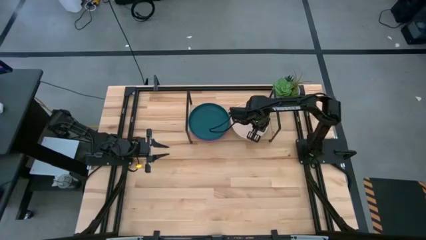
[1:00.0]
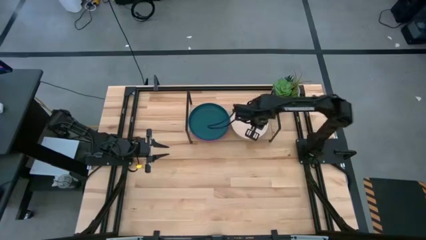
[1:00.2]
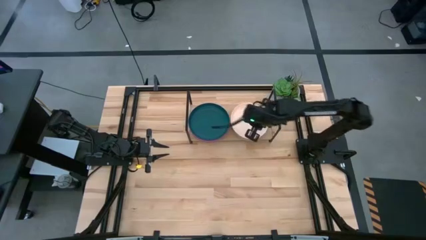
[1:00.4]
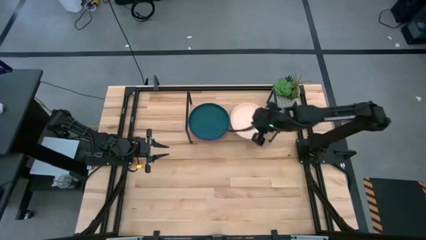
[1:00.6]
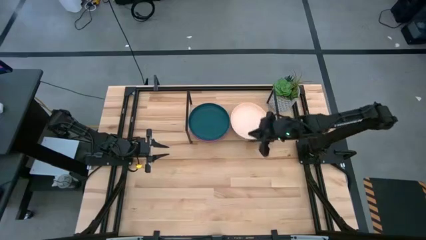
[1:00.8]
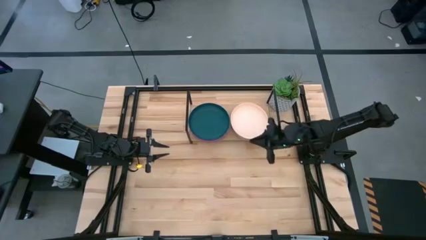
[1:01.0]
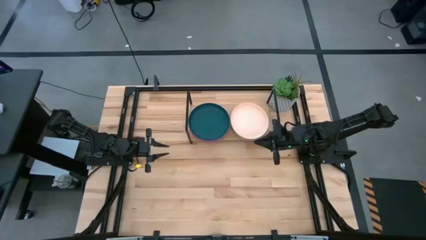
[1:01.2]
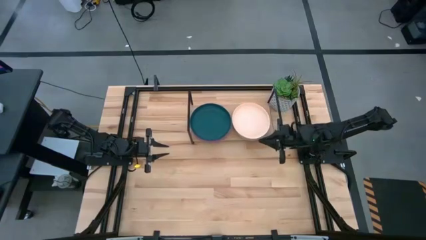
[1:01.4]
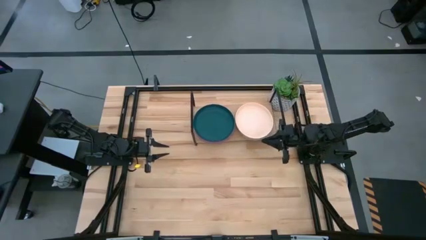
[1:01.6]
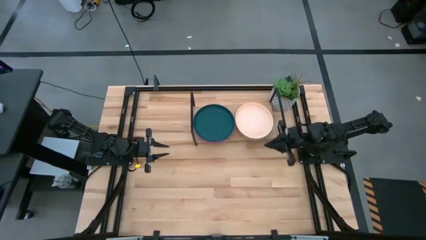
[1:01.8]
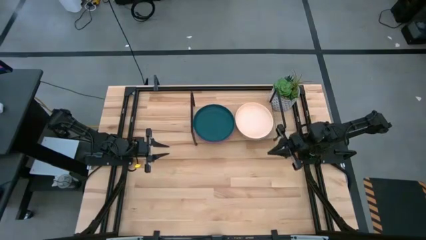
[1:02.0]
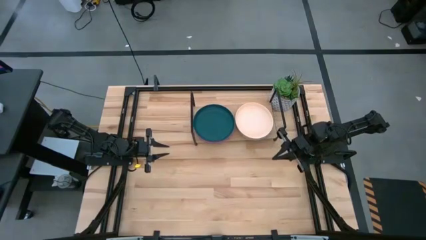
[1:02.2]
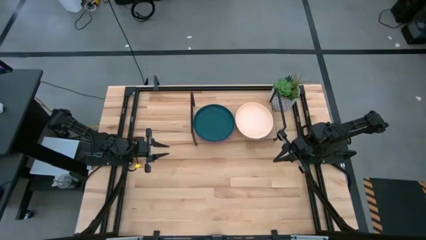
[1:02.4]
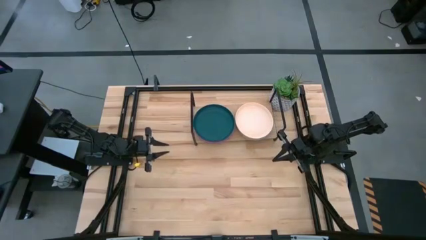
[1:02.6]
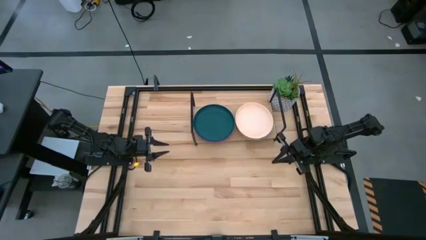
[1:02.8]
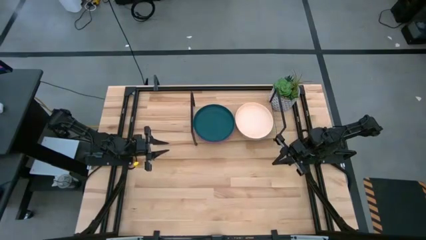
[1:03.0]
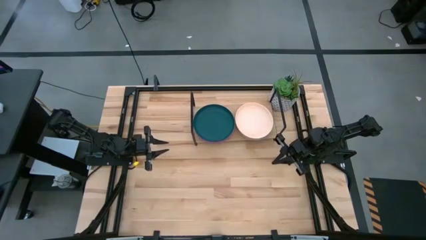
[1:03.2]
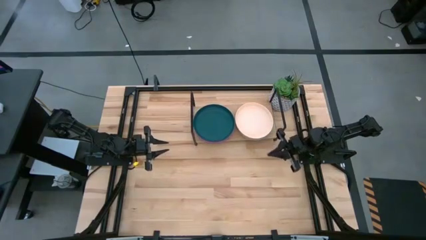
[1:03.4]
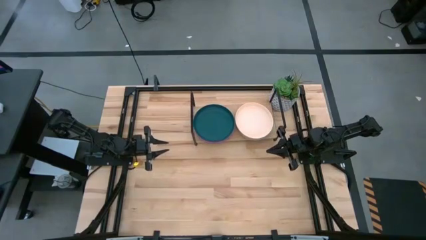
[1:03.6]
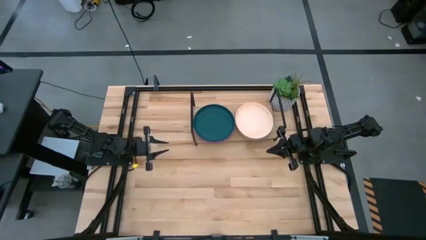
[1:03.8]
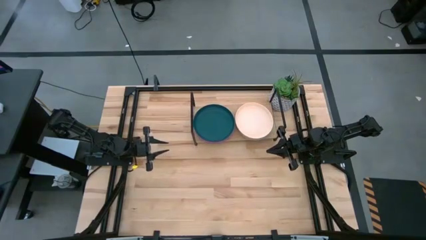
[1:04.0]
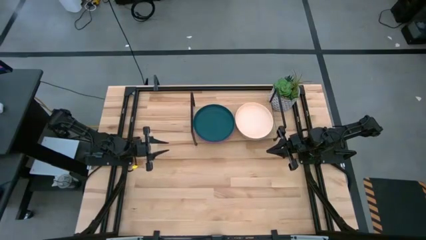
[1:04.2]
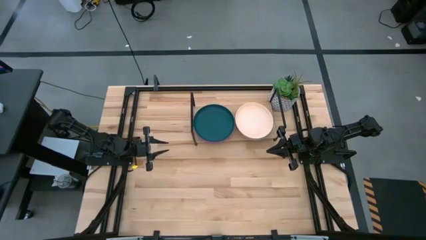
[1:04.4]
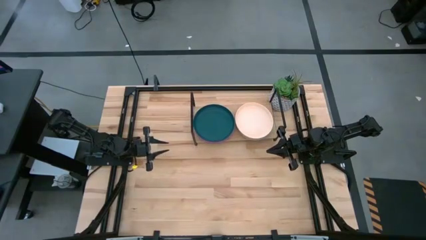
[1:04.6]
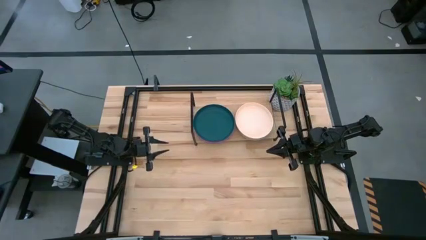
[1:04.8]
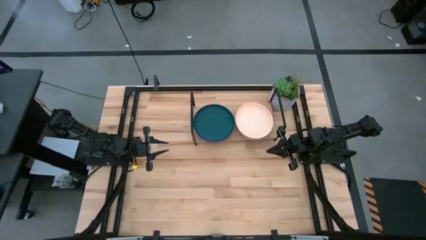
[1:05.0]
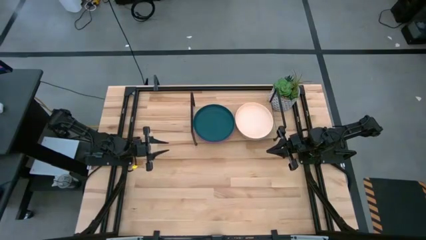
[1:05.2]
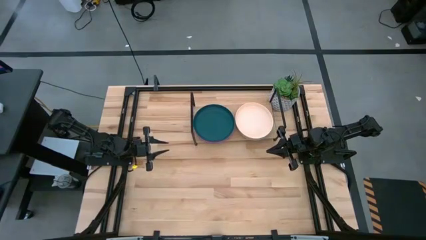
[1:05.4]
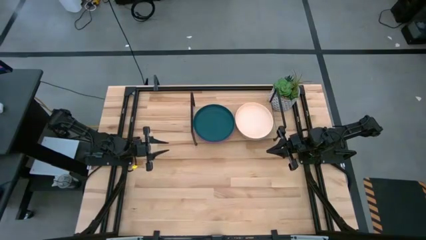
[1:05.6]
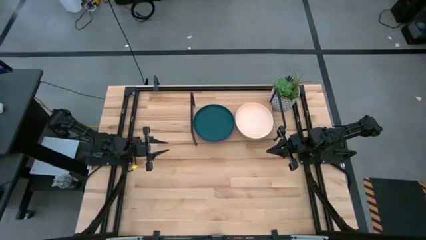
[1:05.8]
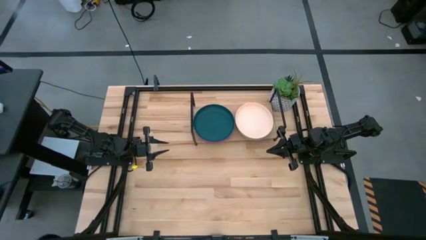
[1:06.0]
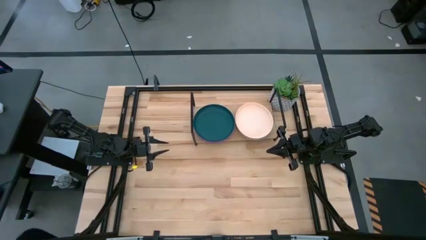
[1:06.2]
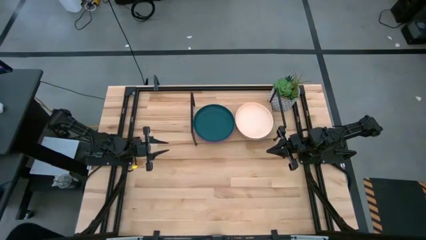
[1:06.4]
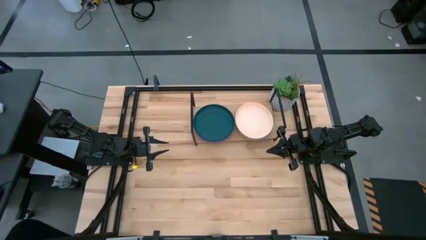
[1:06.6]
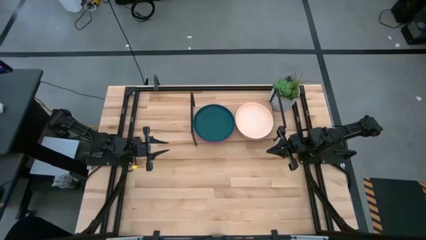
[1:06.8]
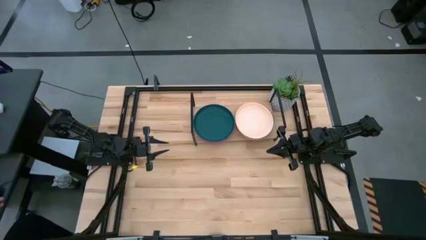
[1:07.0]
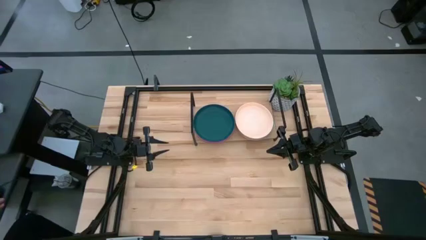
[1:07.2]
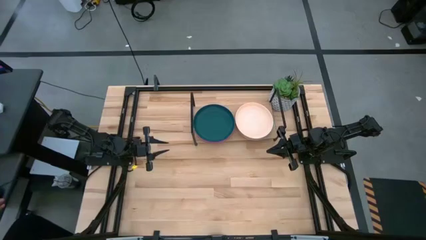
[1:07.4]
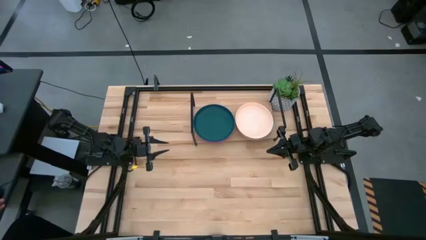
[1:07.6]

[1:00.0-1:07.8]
Task: Place and stack plates onto a shelf
Return to Home Position

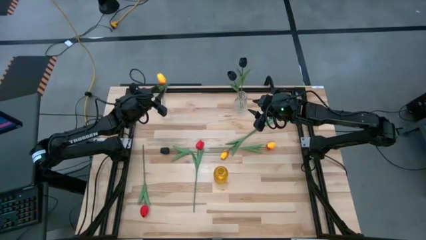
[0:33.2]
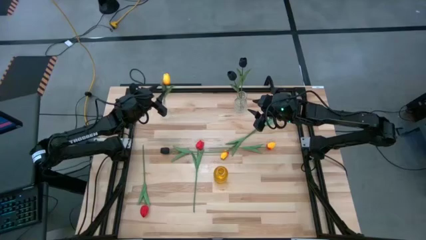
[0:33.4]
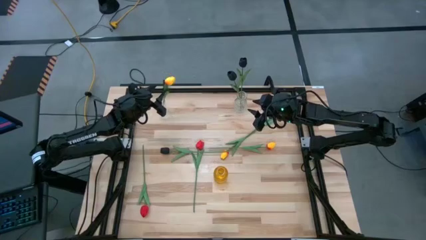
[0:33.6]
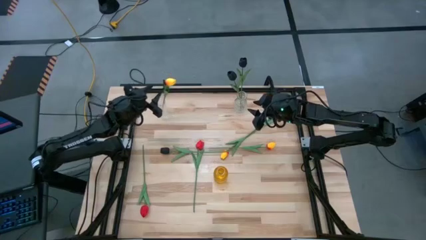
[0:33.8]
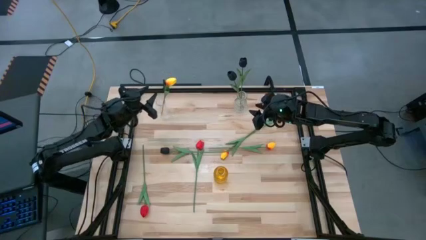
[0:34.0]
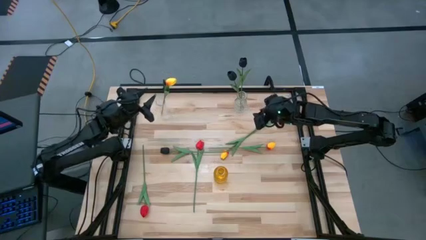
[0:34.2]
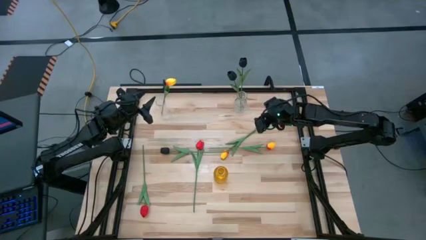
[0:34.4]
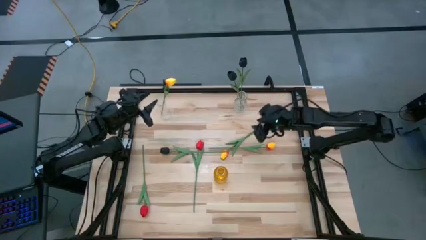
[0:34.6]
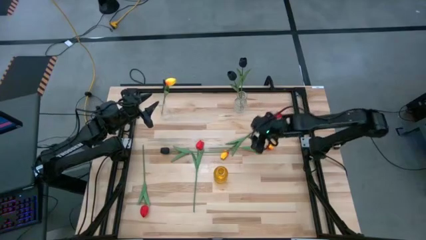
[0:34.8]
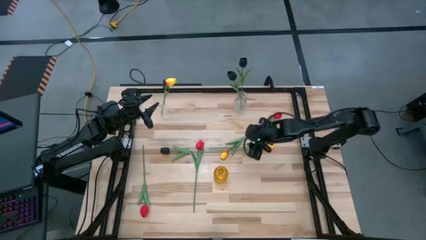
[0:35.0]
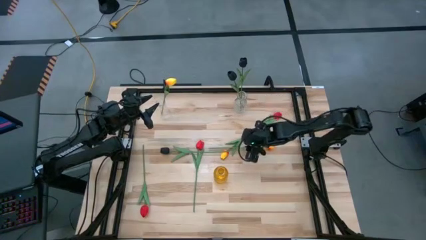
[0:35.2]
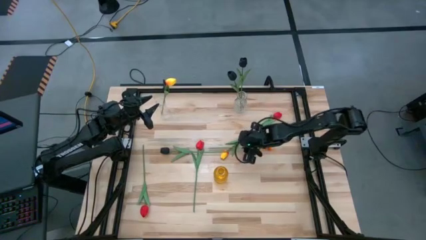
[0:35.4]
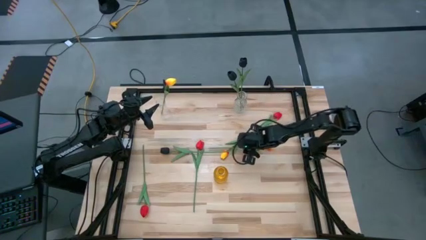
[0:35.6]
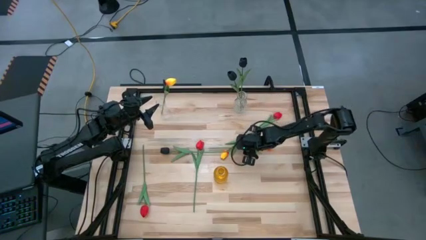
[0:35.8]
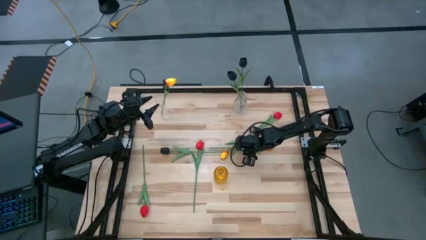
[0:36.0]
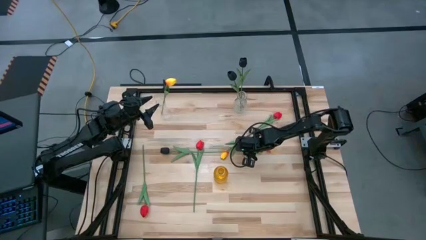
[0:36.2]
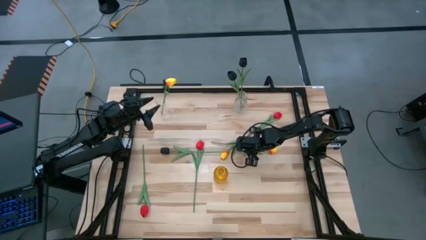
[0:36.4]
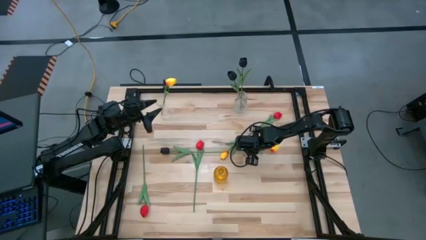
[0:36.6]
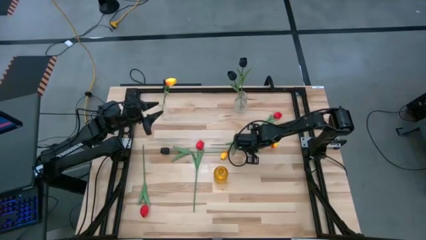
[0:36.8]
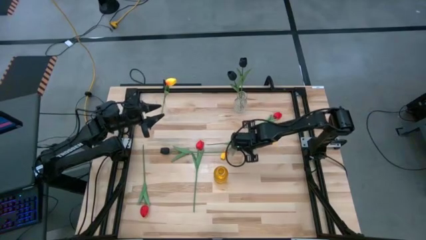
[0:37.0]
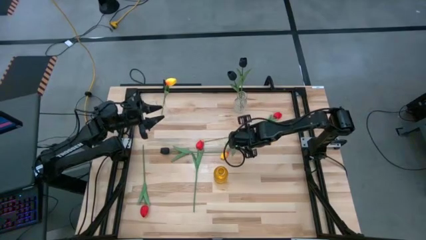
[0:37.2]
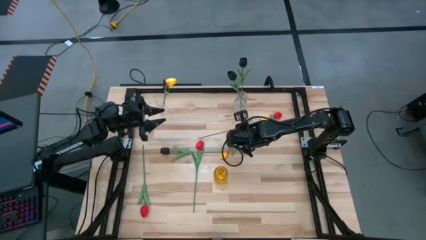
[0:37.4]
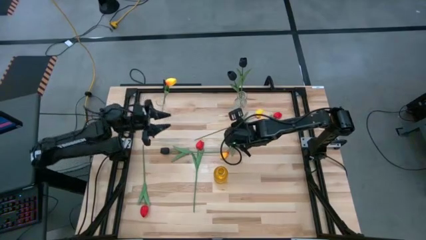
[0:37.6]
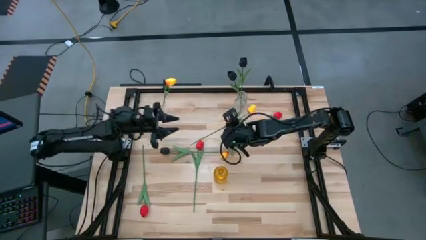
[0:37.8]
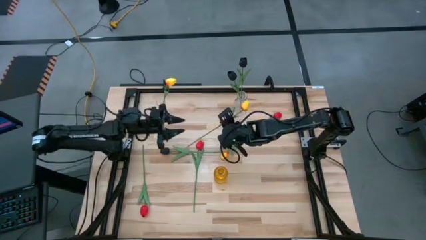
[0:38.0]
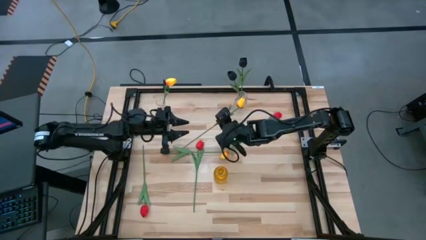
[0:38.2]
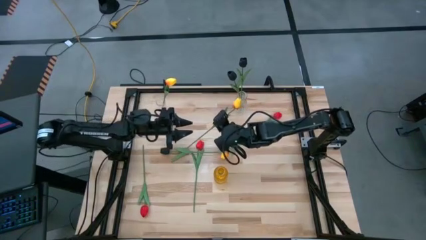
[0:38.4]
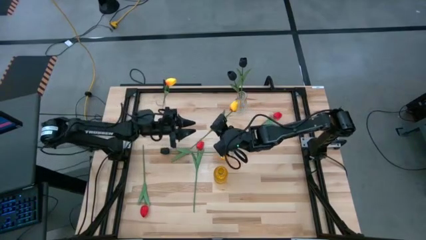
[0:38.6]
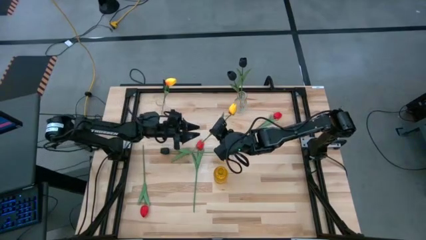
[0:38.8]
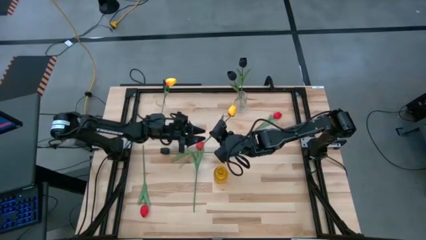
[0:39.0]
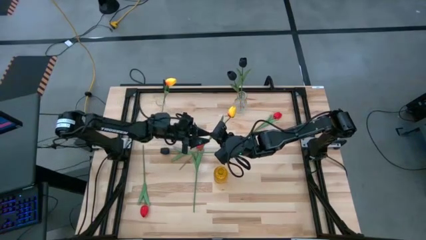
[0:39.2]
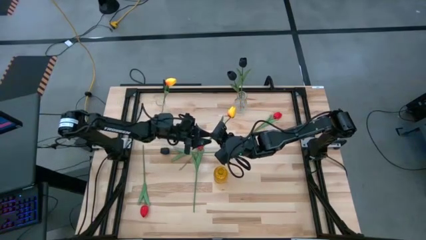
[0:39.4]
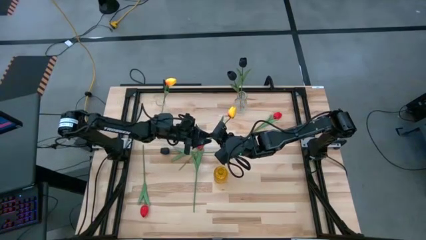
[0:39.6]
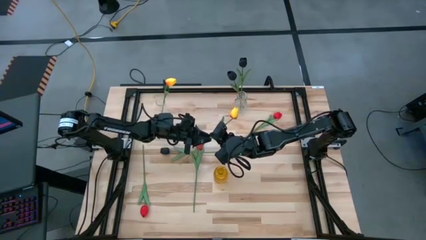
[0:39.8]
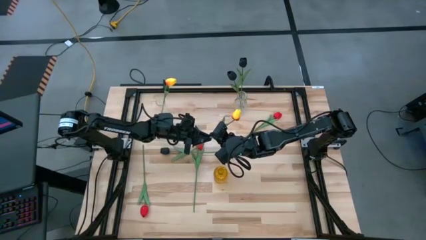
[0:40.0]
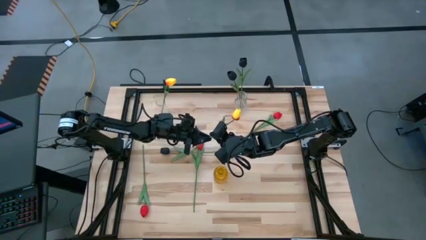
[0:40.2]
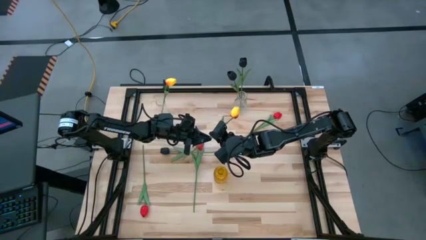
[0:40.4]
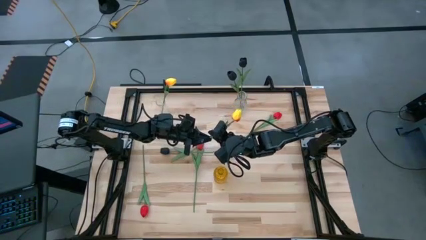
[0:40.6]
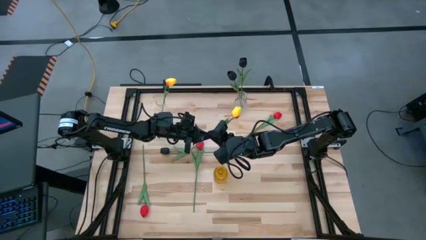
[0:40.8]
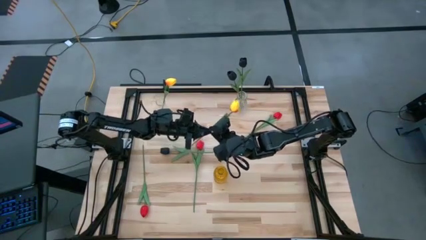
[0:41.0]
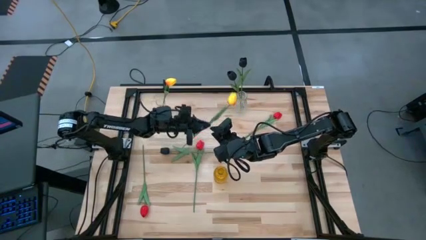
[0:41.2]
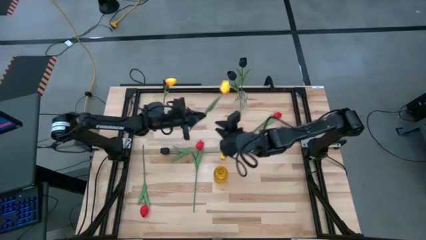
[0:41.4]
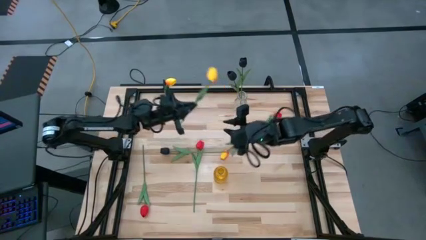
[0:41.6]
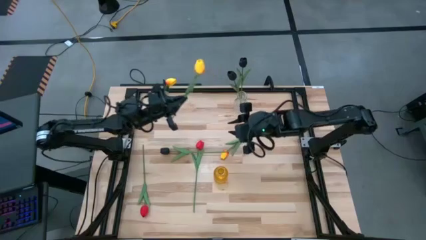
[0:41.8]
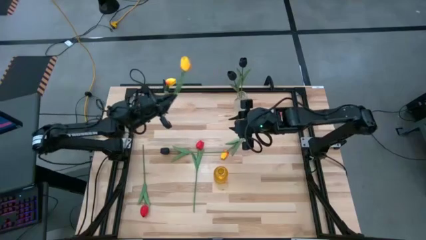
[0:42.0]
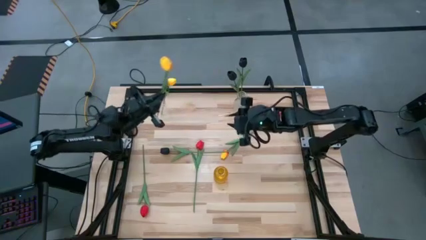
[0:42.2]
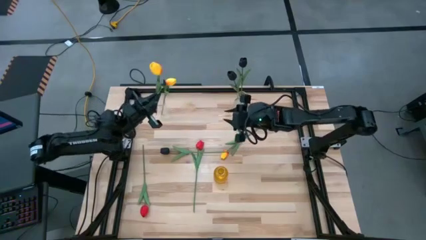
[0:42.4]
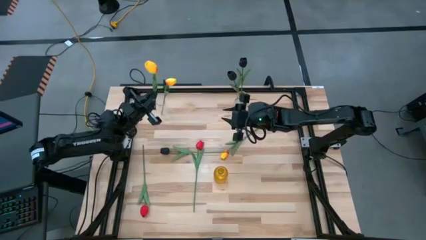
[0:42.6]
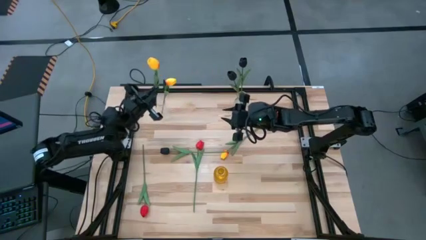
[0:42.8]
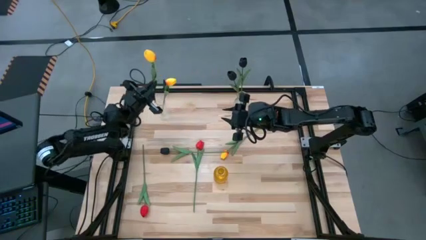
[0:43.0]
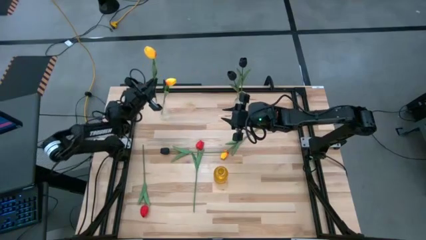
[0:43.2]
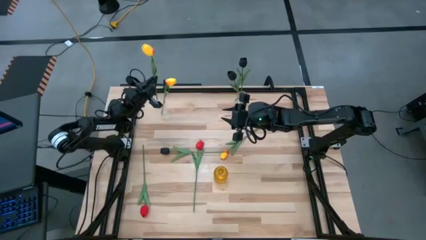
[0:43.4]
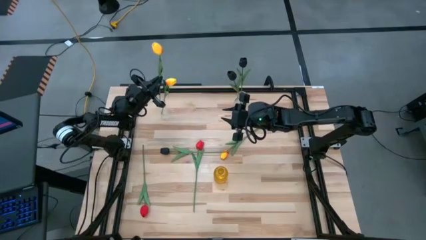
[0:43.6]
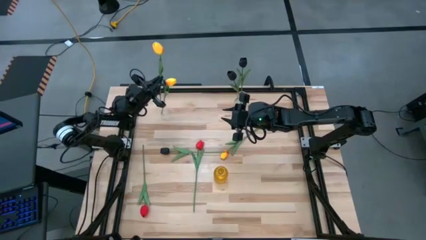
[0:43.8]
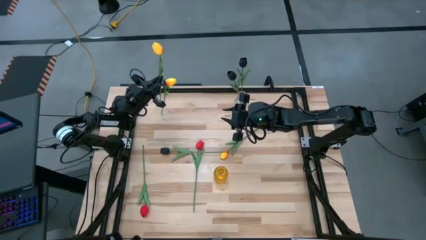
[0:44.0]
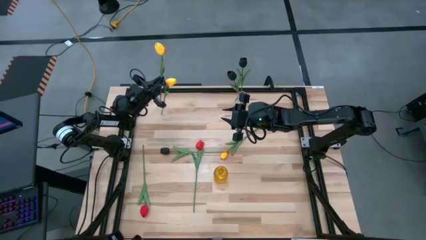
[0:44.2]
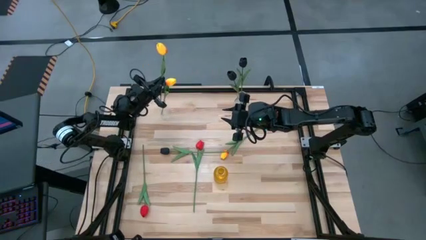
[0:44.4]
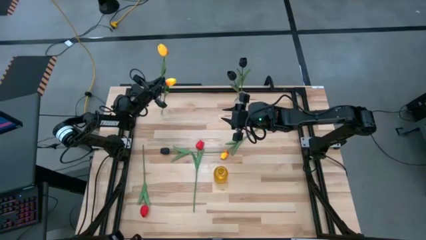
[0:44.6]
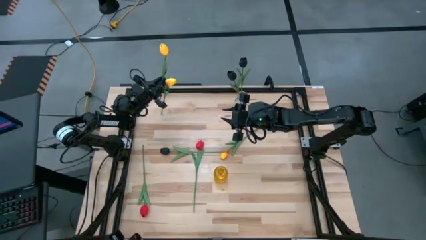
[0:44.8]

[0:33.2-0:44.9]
Task: Sort flowers into vase by color
Put the right yellow flower into the left transparent vase
